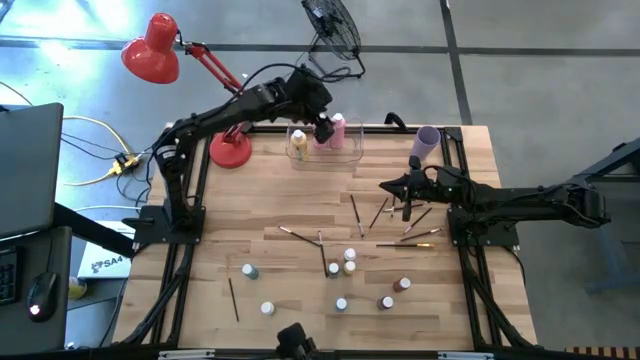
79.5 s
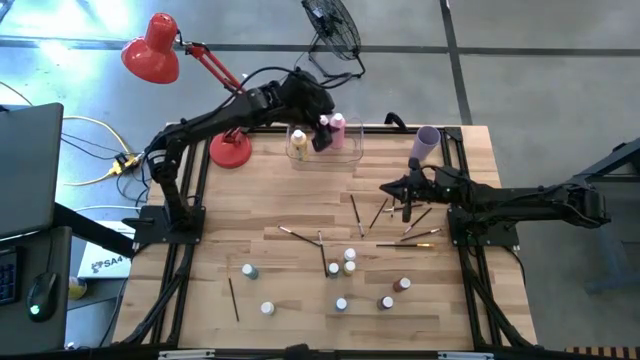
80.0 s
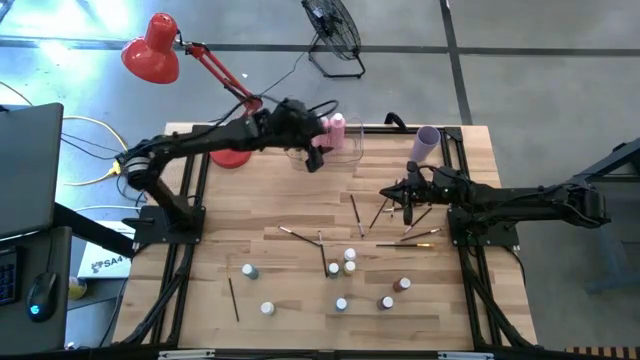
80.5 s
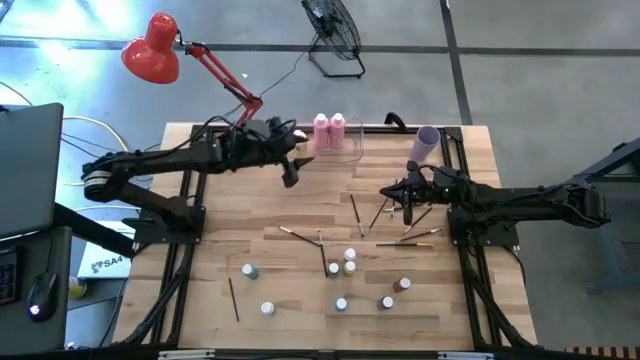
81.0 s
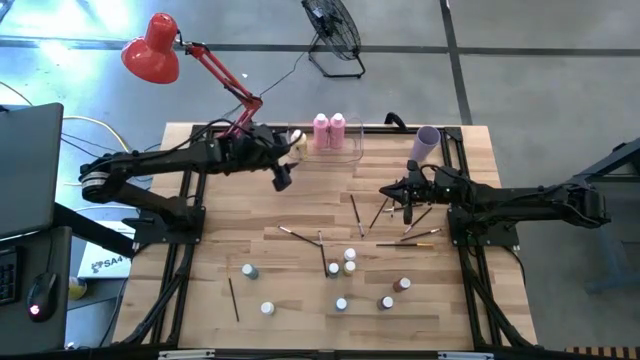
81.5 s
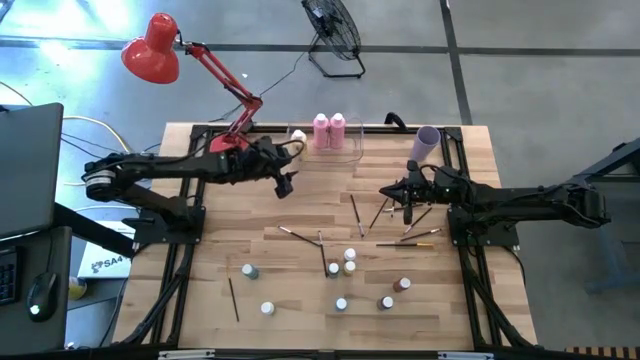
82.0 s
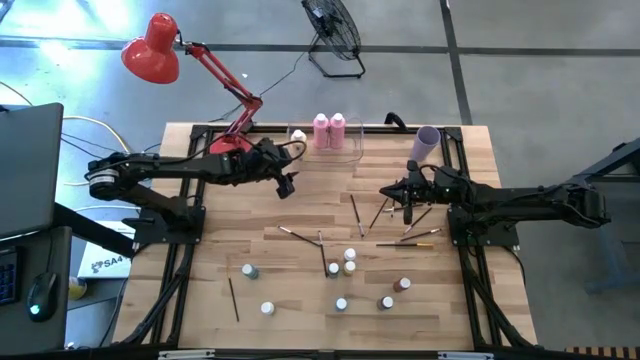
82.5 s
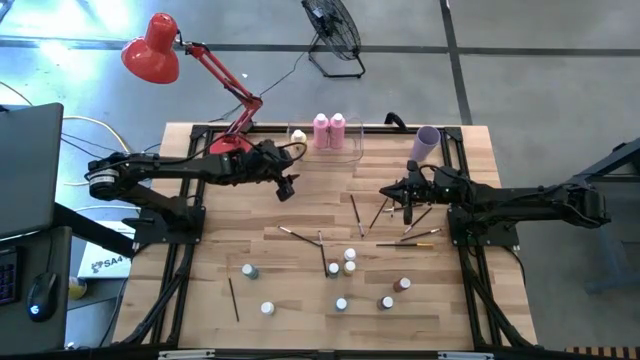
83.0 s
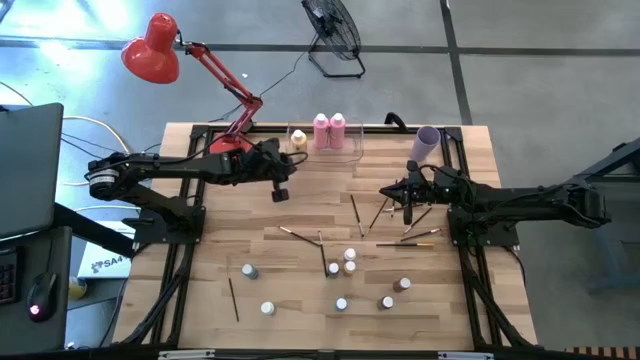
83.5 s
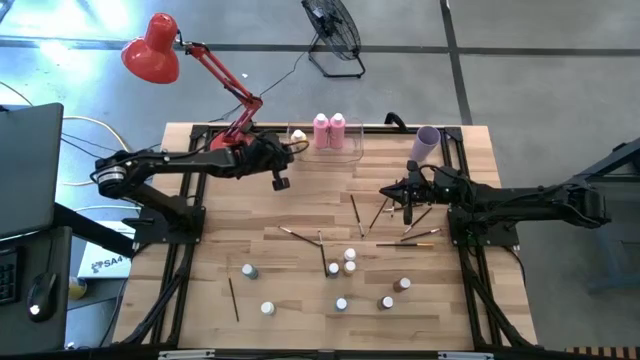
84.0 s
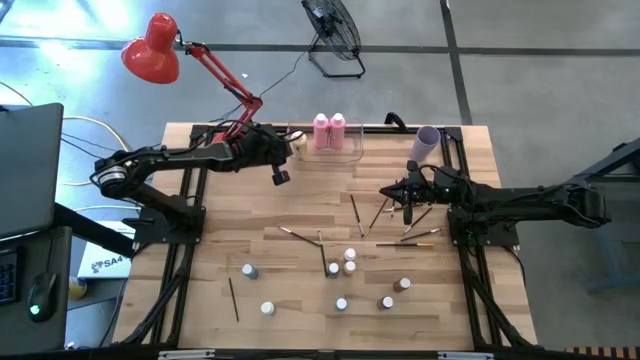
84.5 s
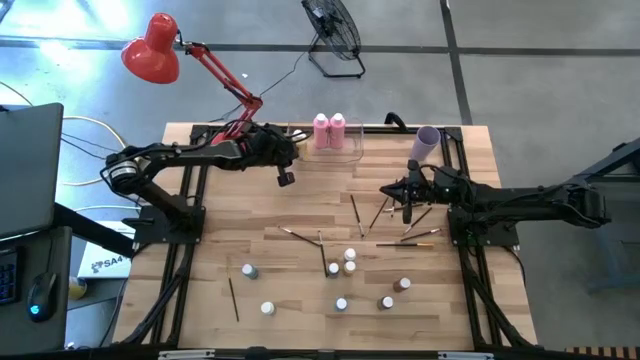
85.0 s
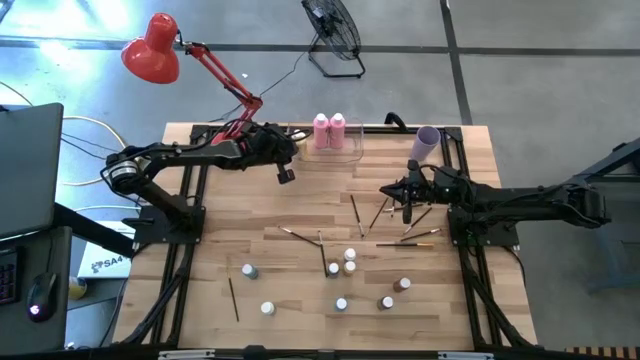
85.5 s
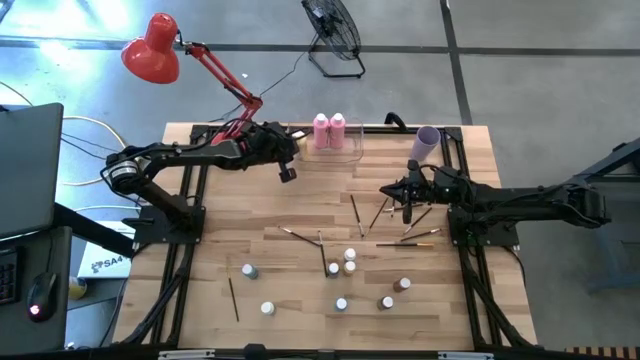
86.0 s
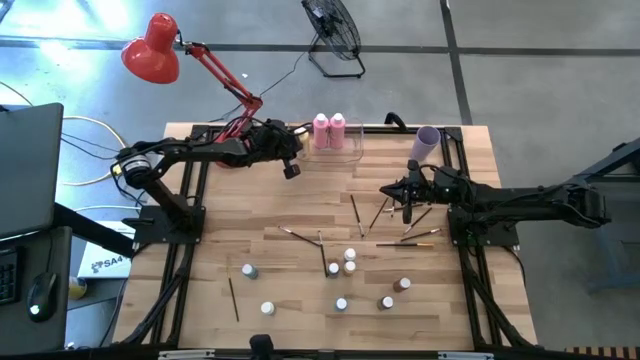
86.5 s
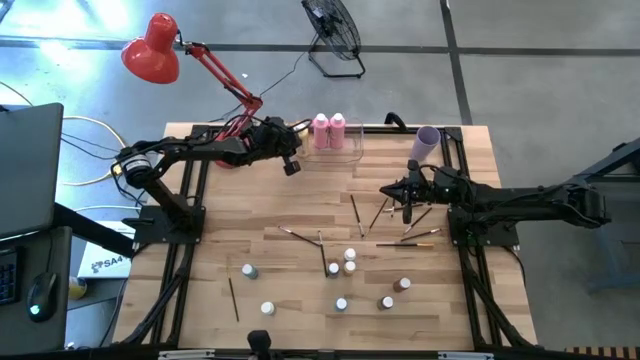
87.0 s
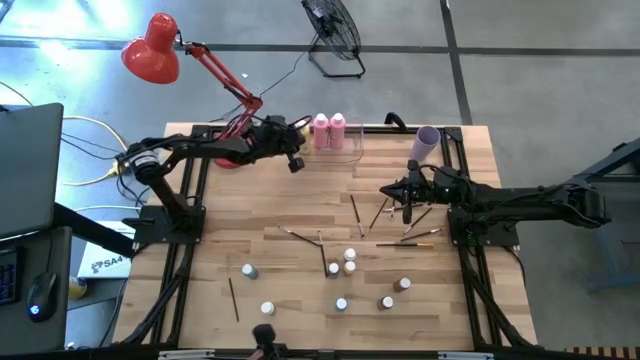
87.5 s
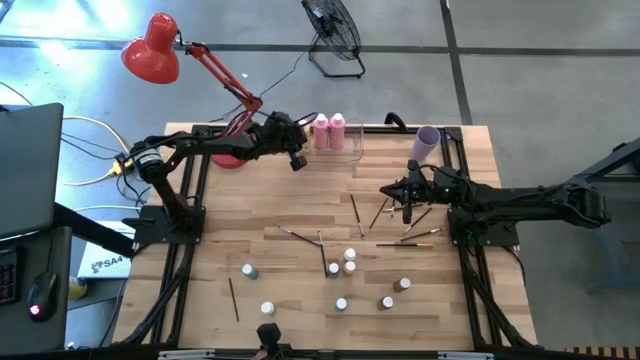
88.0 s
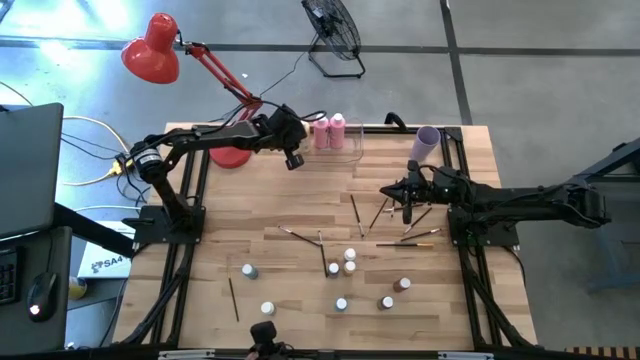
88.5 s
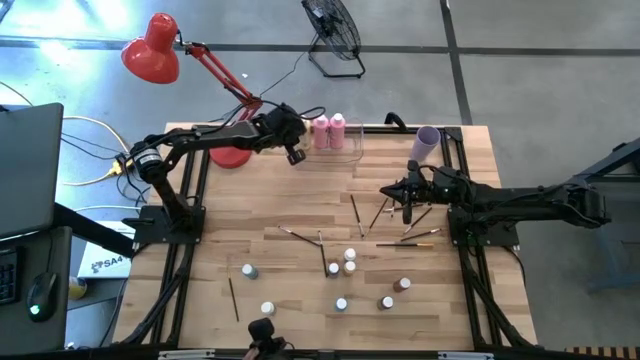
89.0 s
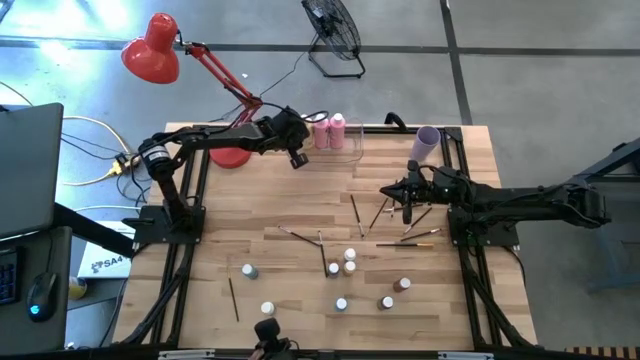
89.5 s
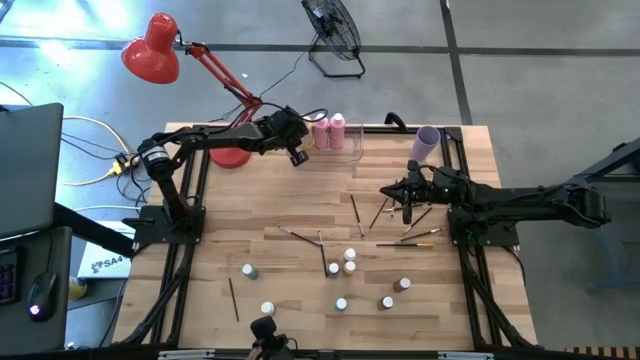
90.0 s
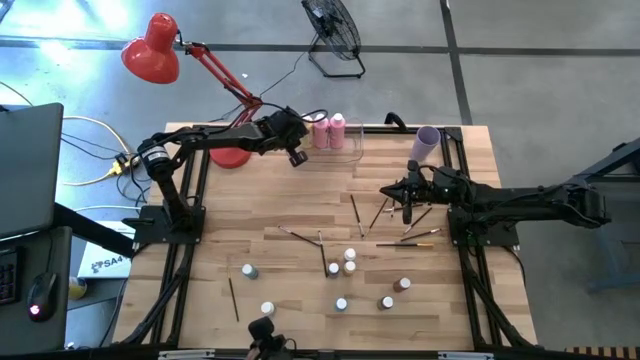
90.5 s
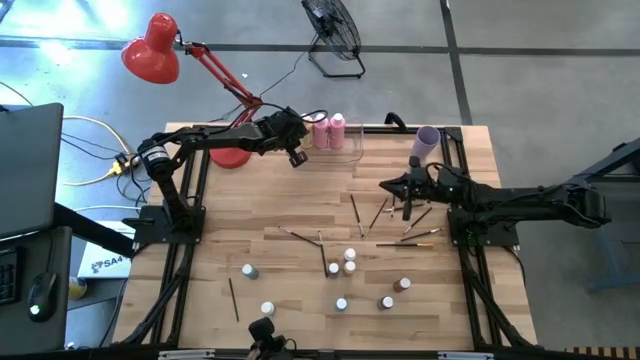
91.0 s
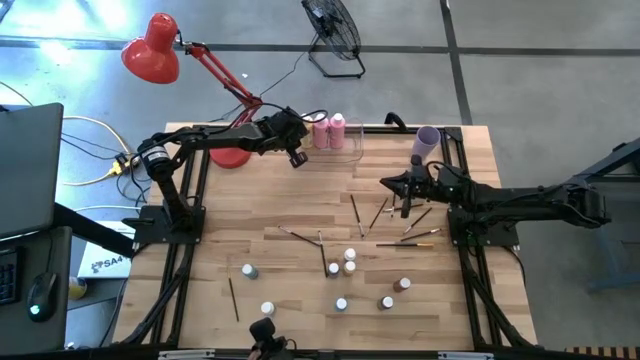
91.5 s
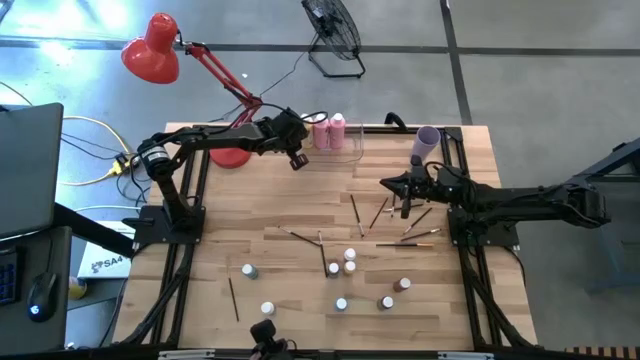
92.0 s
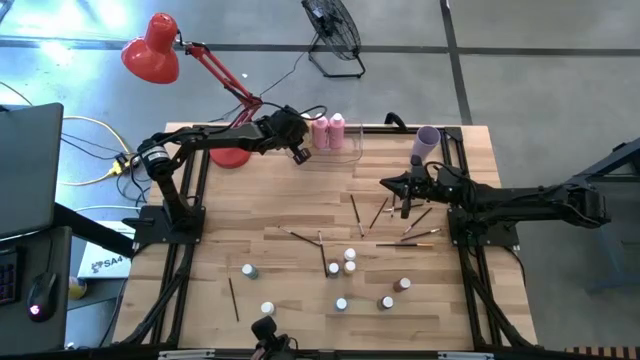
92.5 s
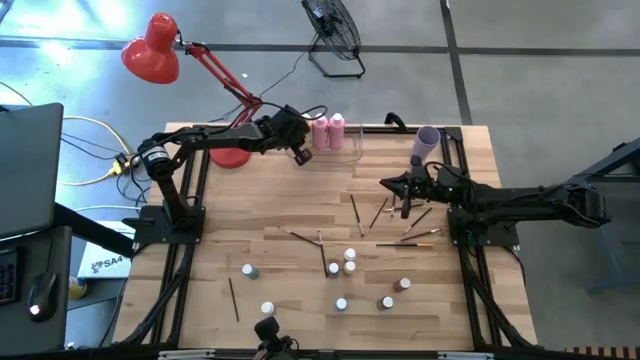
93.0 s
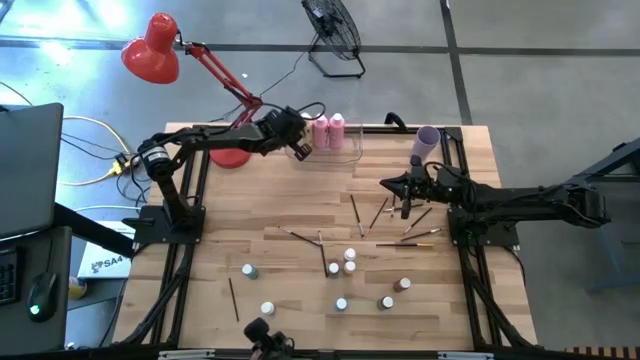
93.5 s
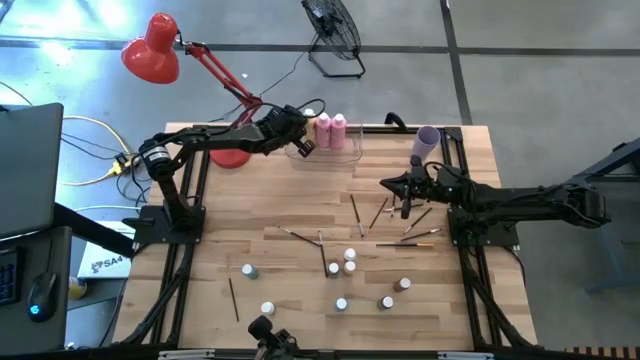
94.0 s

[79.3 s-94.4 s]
Task: Pick & Place Paint Supplies
Adjust the large paint bottles in the transparent bin

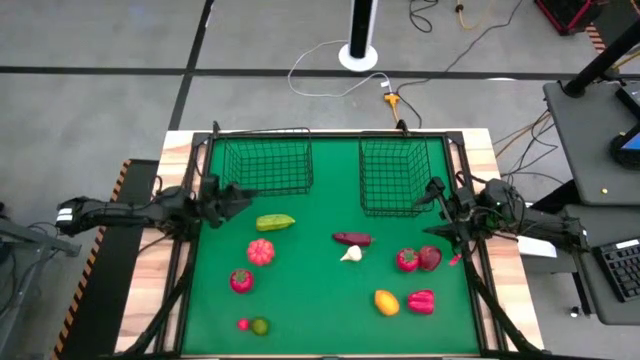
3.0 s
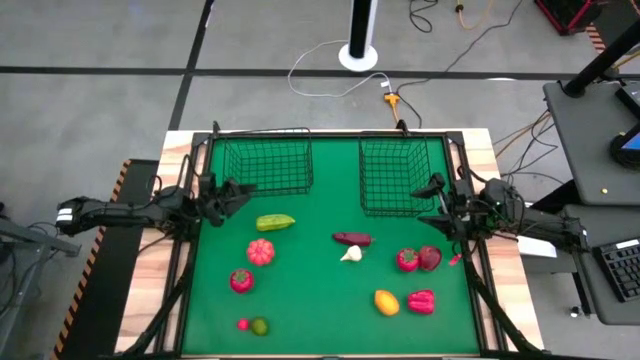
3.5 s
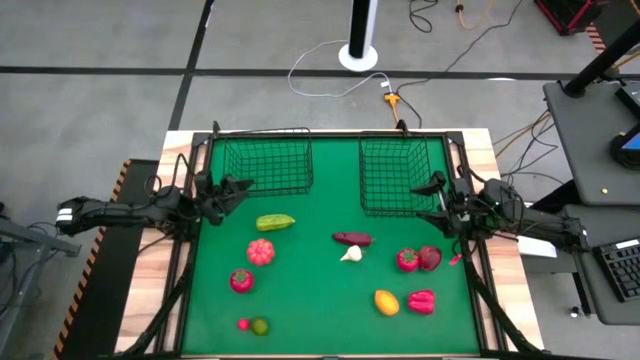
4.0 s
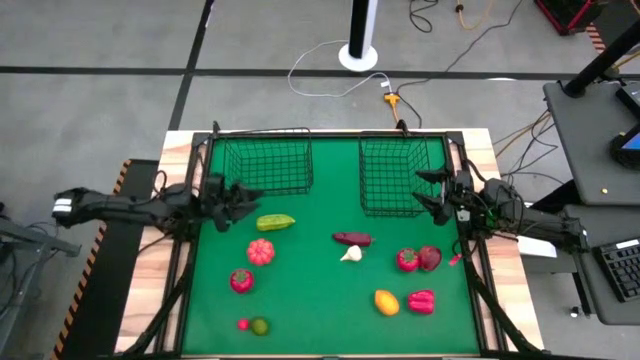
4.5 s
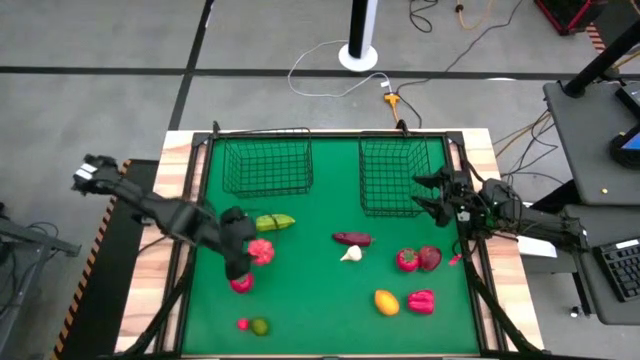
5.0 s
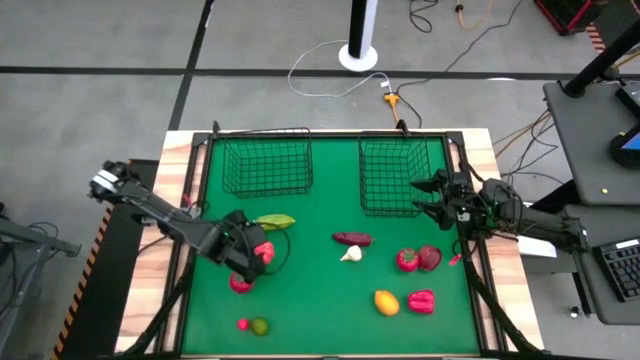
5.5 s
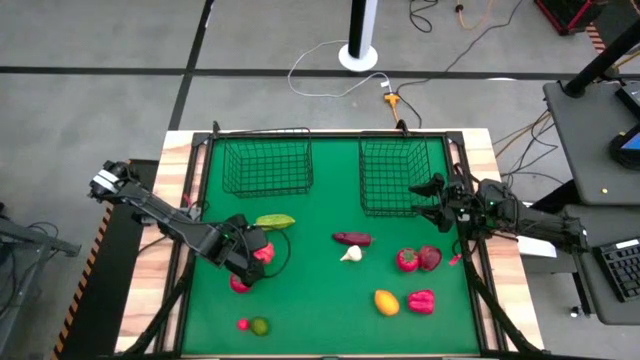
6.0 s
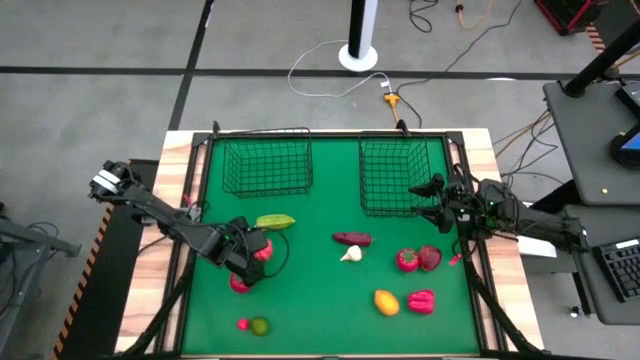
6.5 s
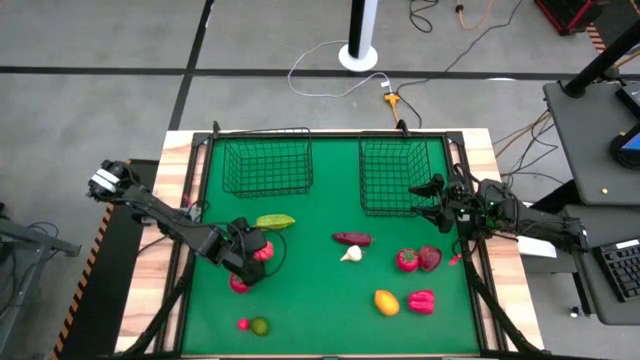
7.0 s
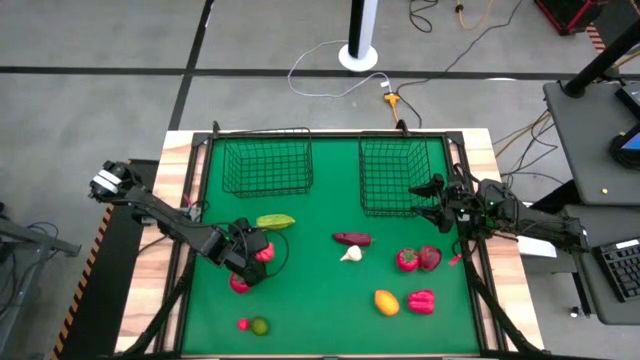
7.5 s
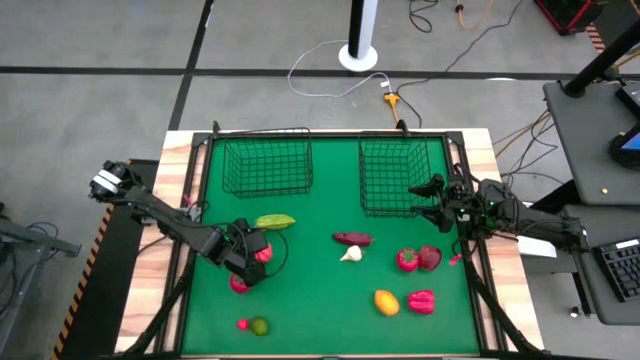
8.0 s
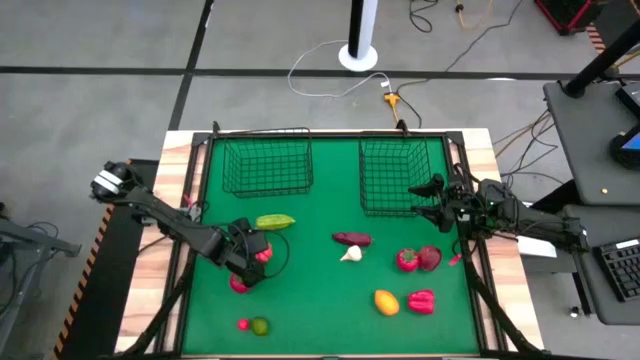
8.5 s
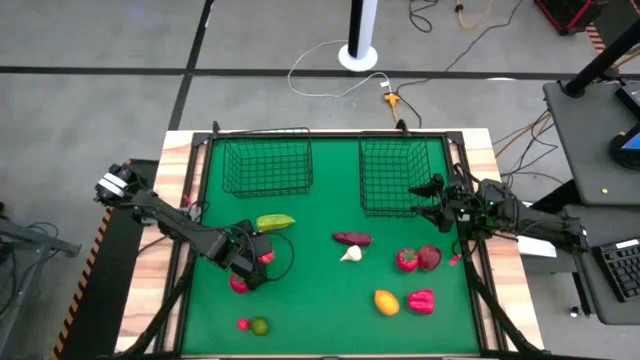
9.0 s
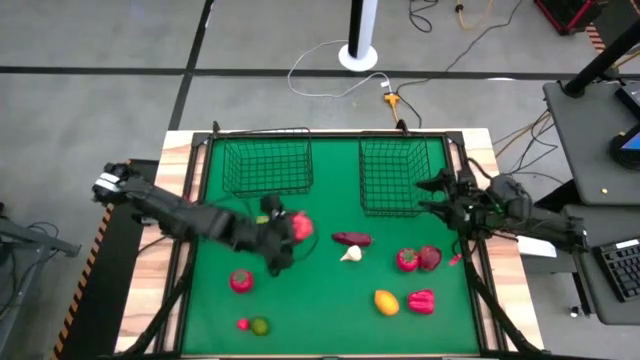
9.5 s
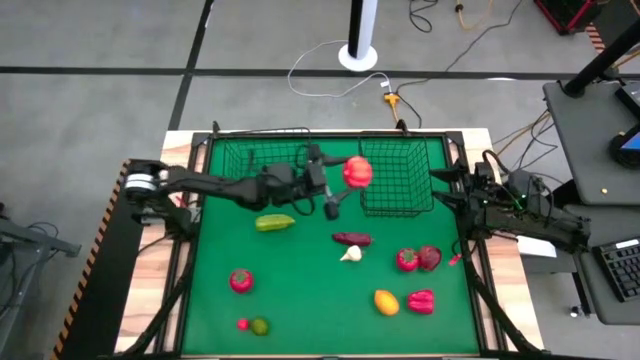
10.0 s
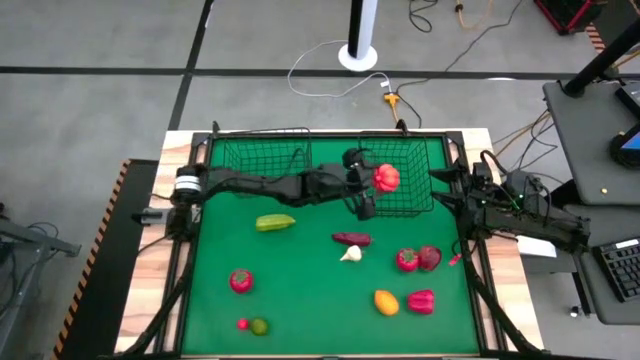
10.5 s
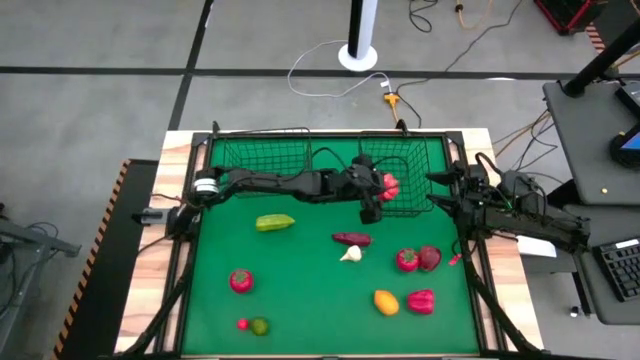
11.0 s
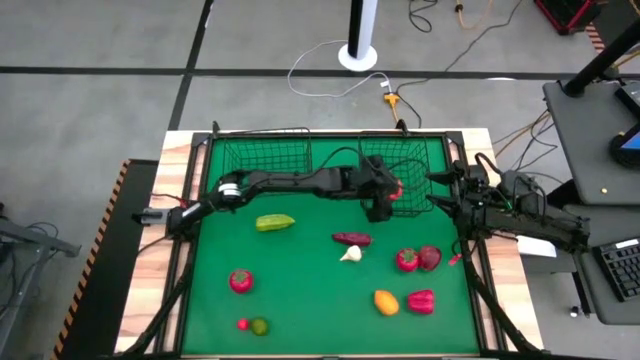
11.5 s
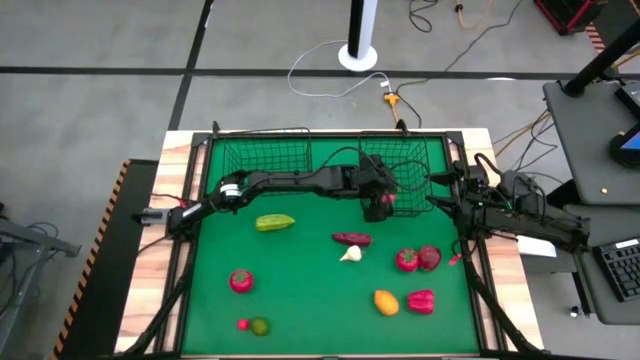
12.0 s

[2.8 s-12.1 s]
Task: Sort produce into baskets
Put the orange pumpkin into the right wire basket
